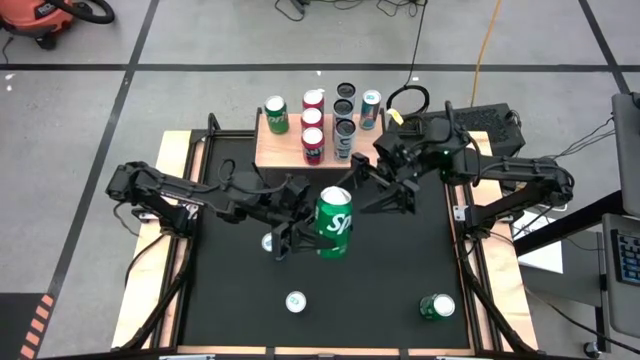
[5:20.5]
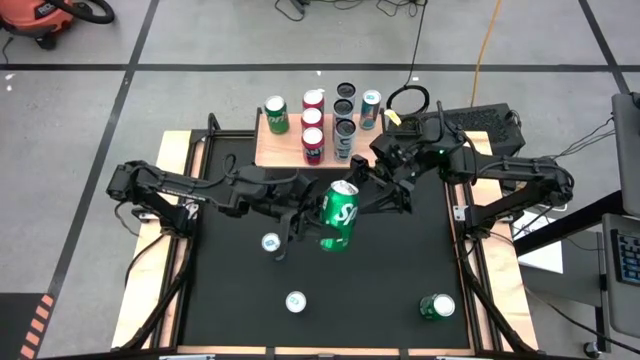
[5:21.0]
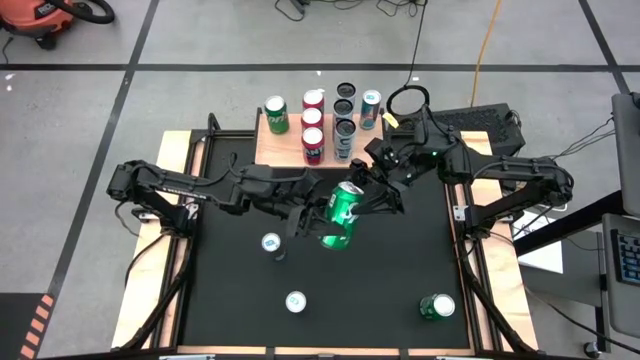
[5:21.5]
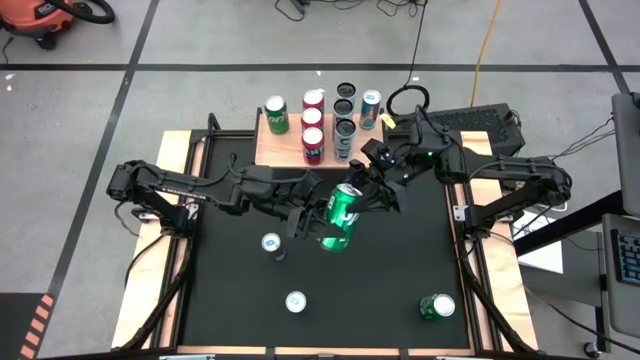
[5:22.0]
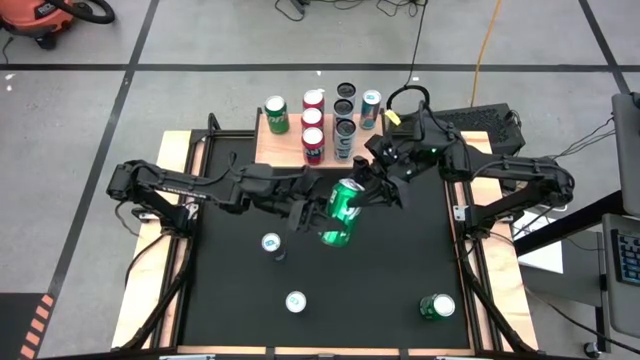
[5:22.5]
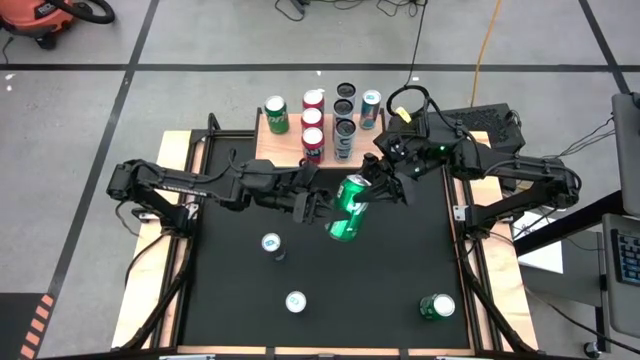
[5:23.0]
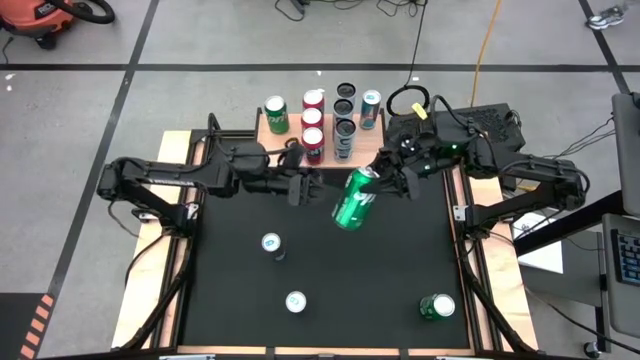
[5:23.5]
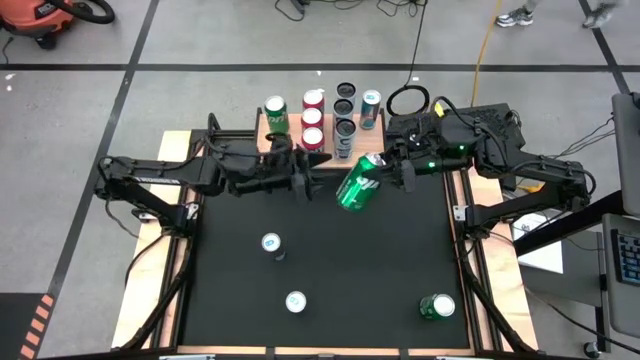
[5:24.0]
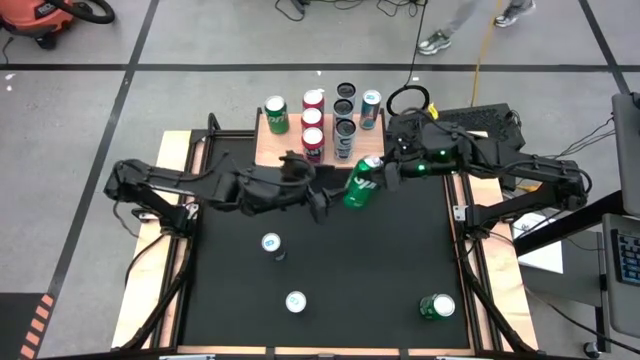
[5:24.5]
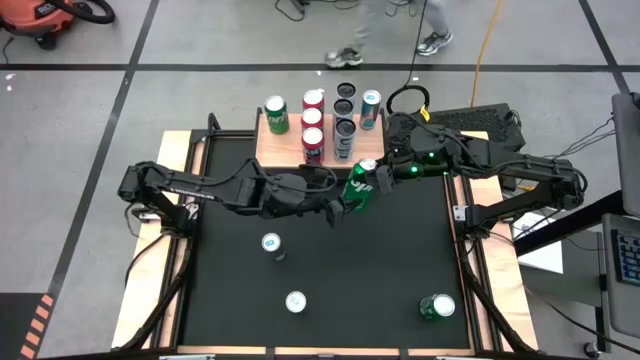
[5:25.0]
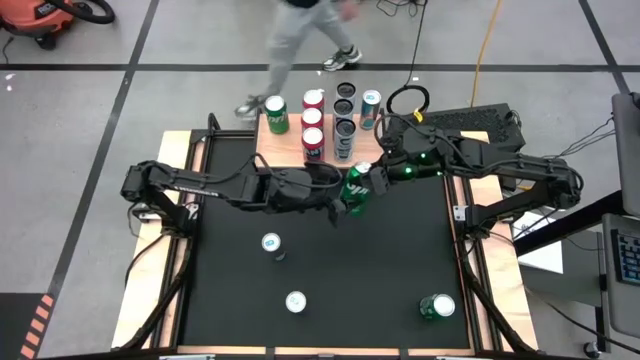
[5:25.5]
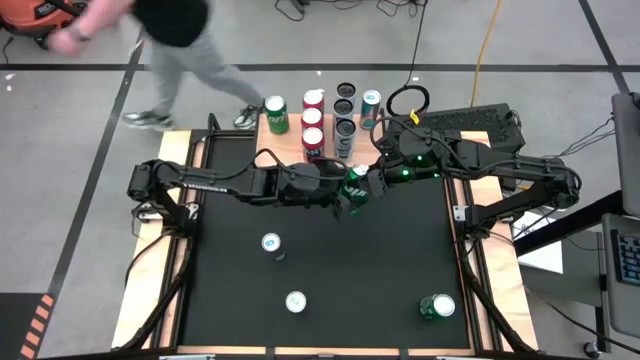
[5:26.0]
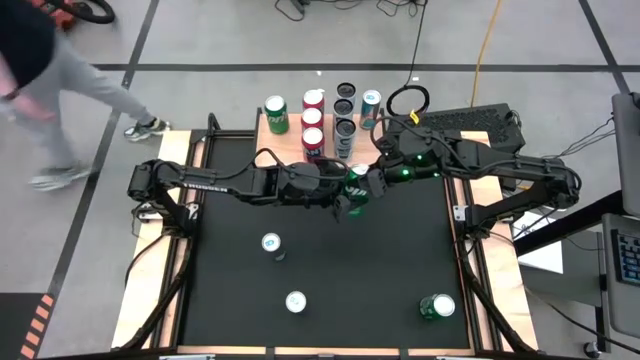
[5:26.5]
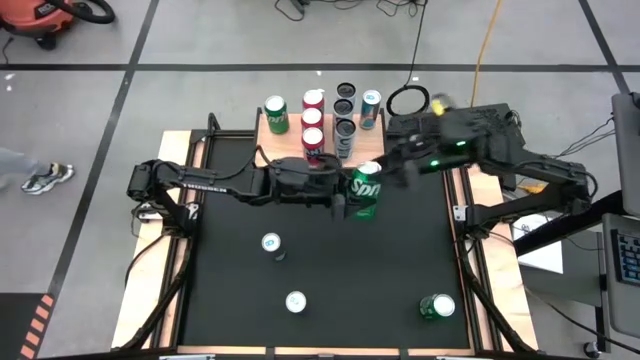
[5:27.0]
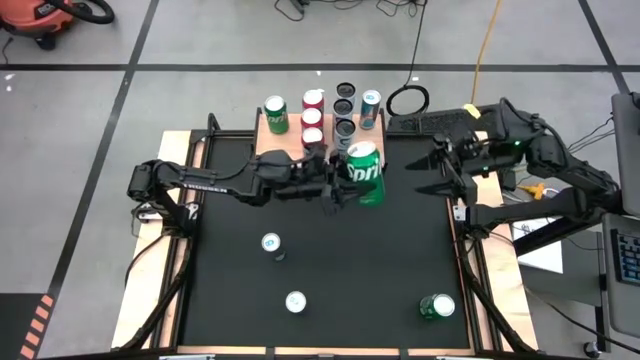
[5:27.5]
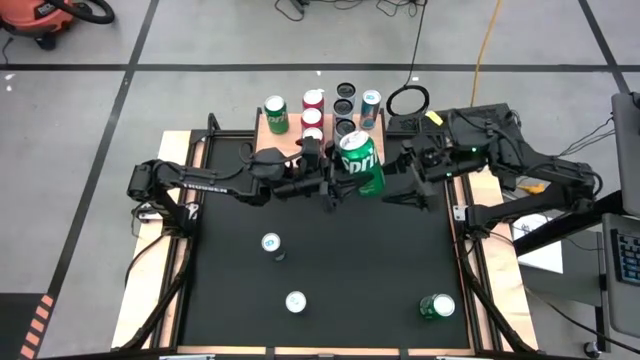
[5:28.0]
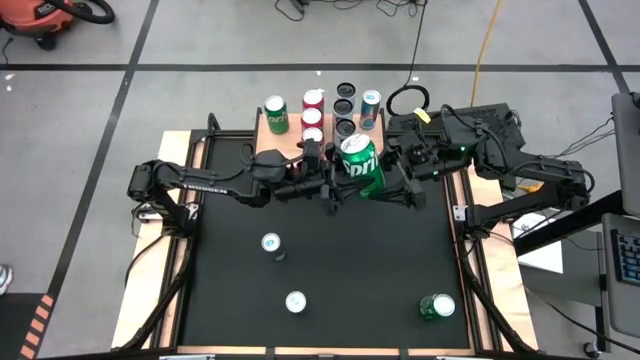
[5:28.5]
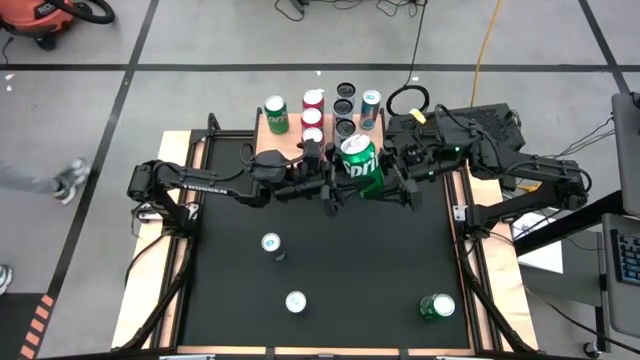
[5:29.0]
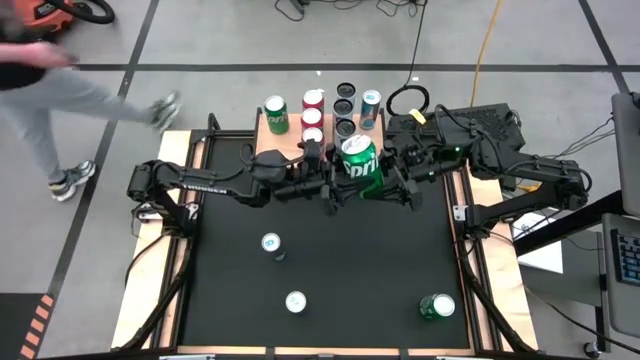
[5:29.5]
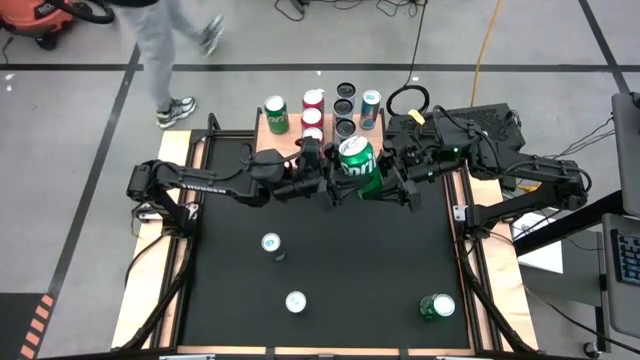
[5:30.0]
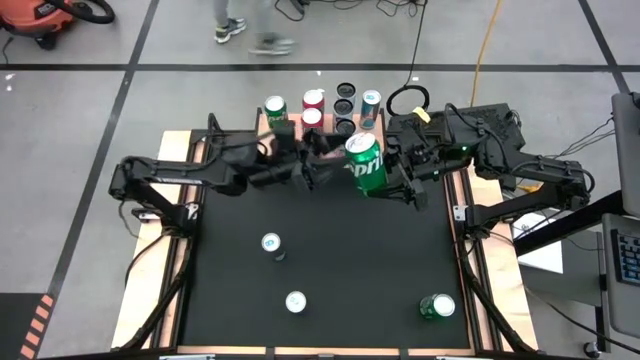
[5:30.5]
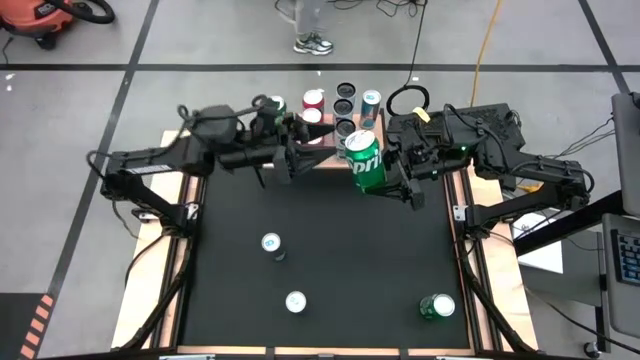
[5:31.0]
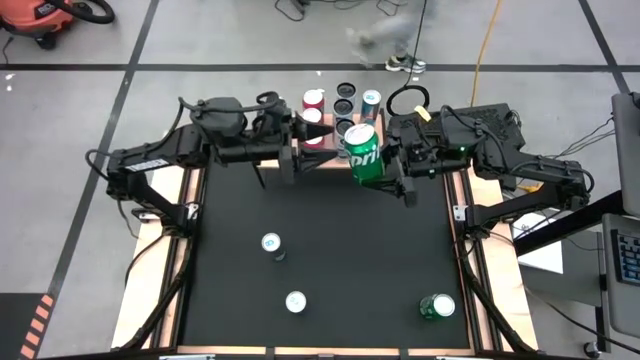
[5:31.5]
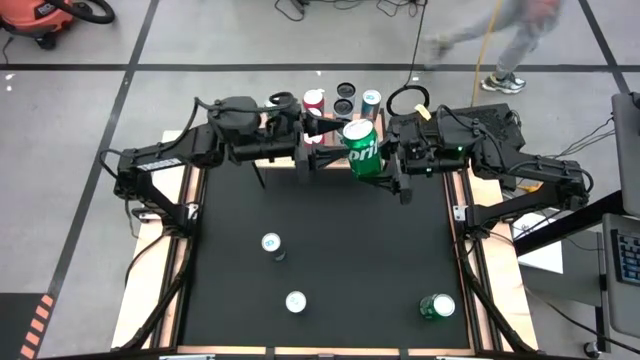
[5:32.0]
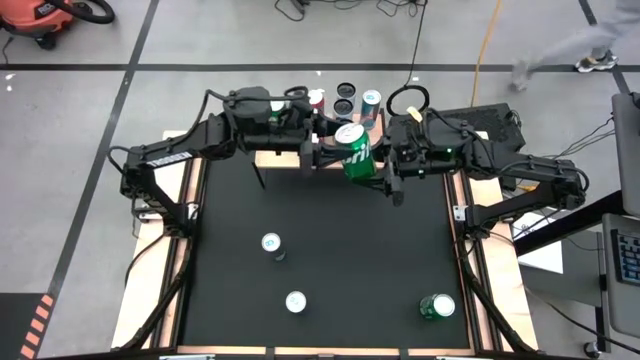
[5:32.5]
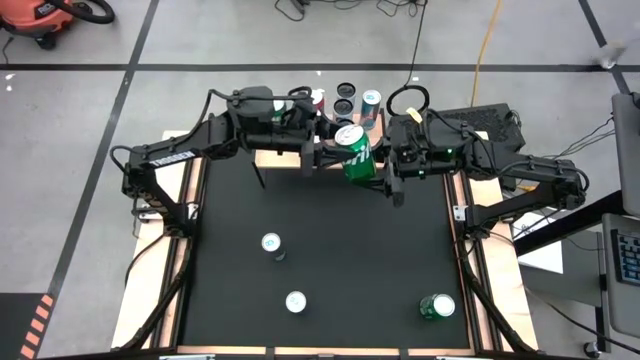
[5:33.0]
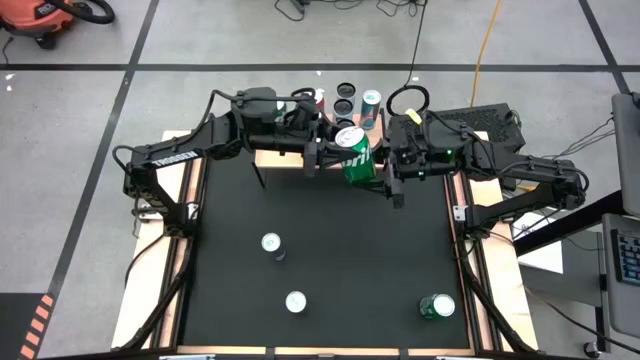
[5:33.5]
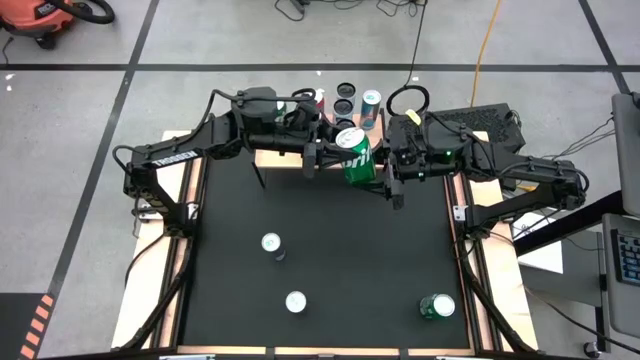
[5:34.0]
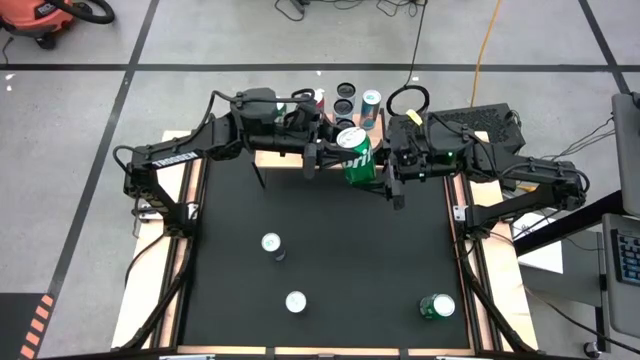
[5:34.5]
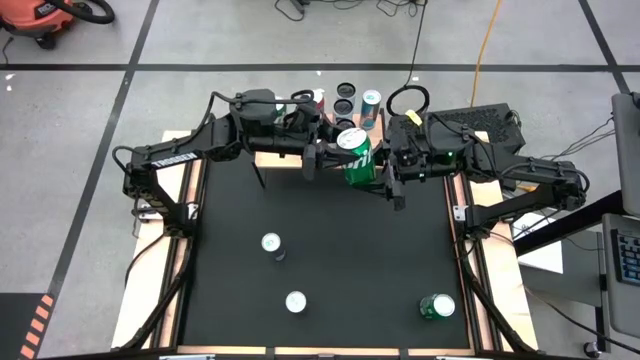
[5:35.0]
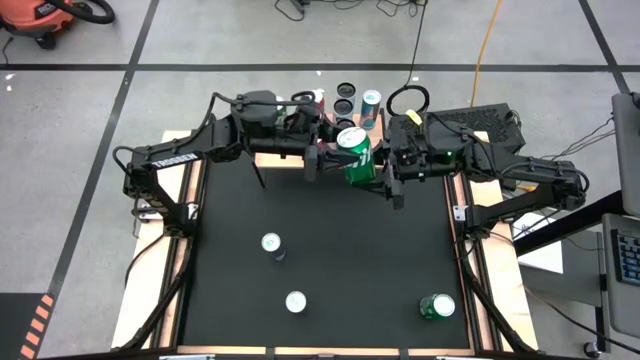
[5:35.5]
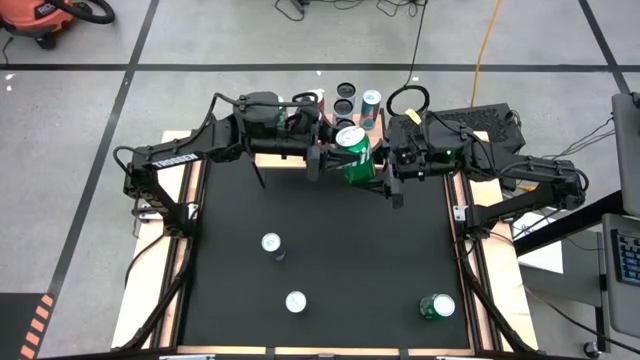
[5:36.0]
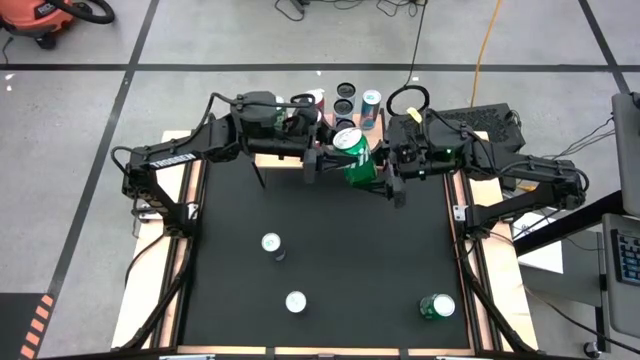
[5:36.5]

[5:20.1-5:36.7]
Task: Place canned beverage on shelf
Put the left green soda can on the shelf aligned with the other green soda can

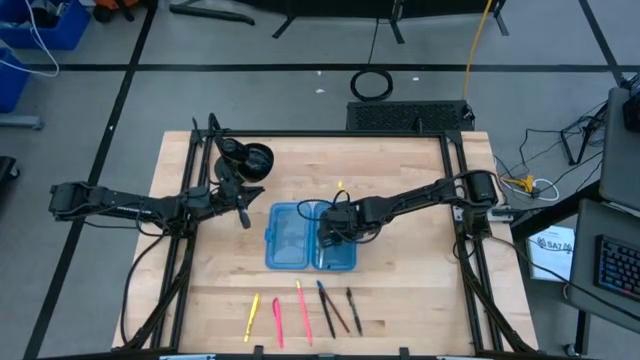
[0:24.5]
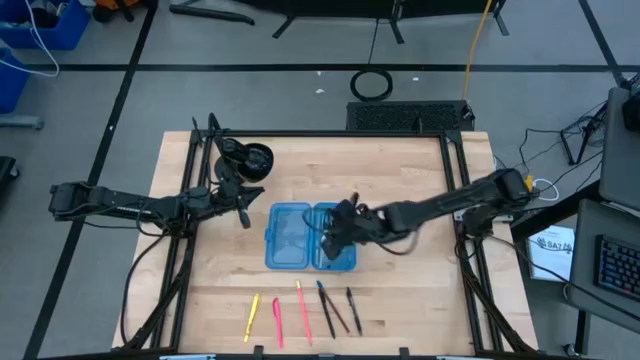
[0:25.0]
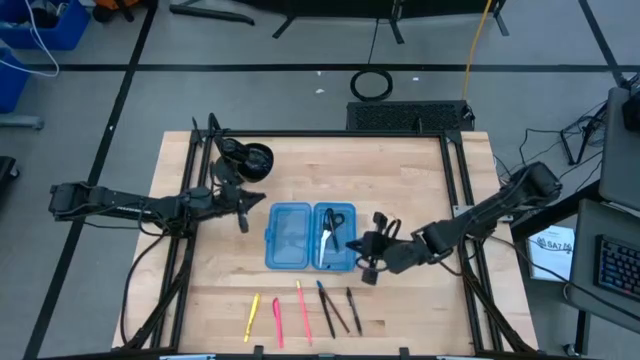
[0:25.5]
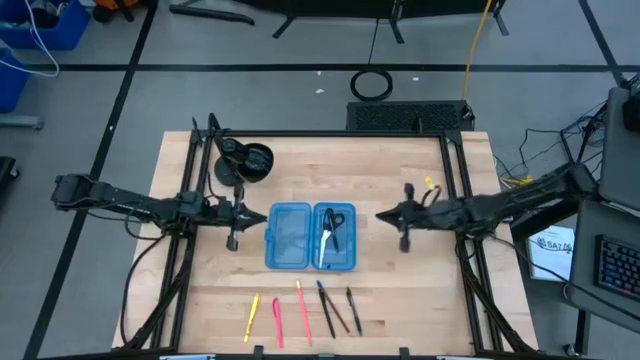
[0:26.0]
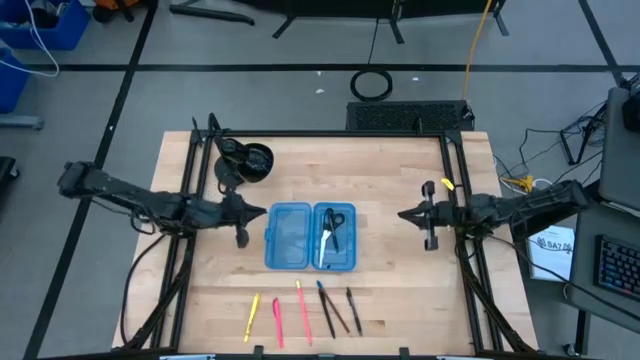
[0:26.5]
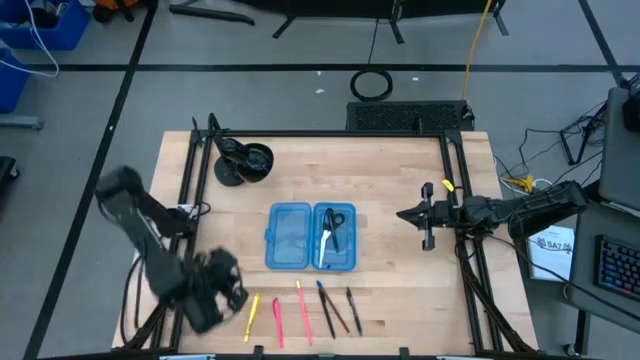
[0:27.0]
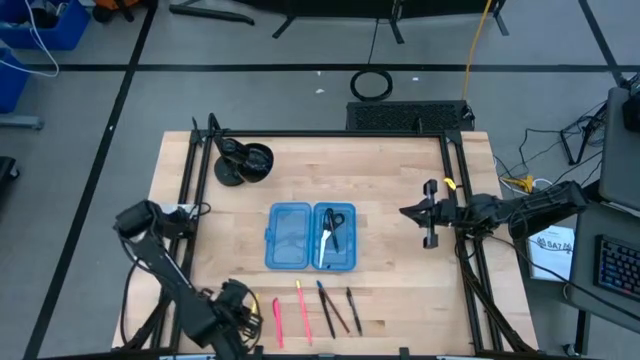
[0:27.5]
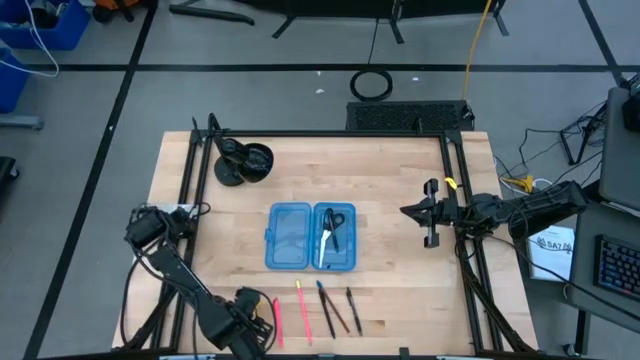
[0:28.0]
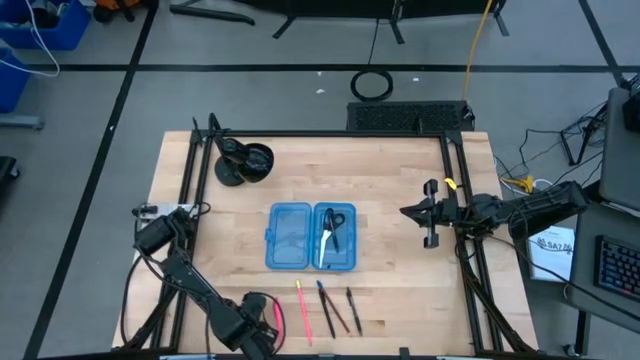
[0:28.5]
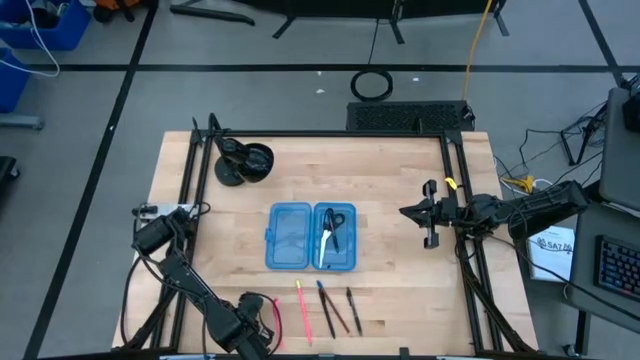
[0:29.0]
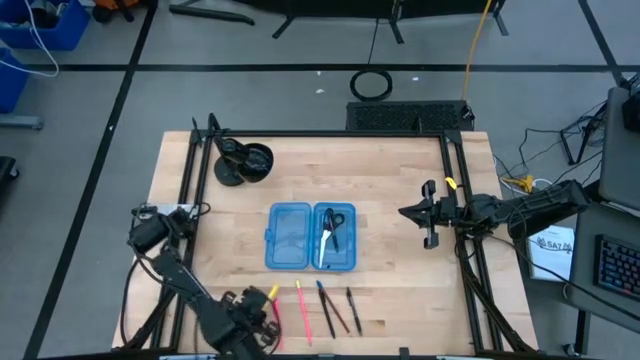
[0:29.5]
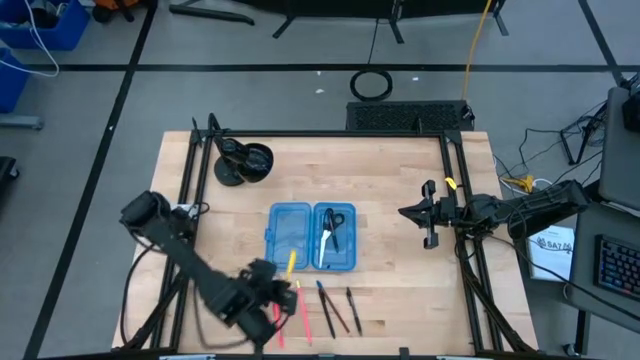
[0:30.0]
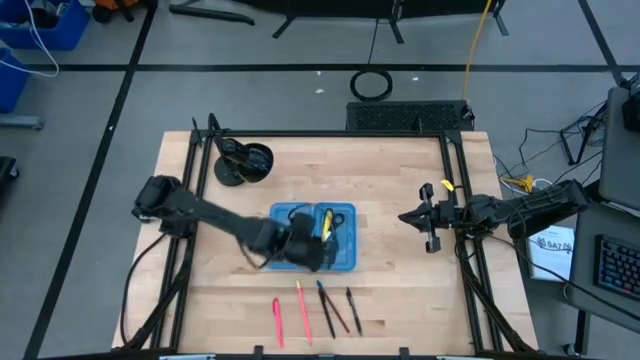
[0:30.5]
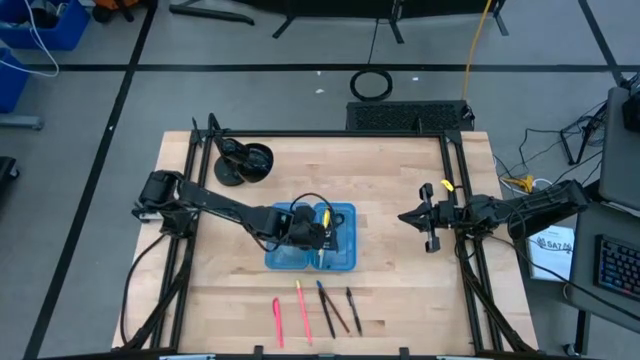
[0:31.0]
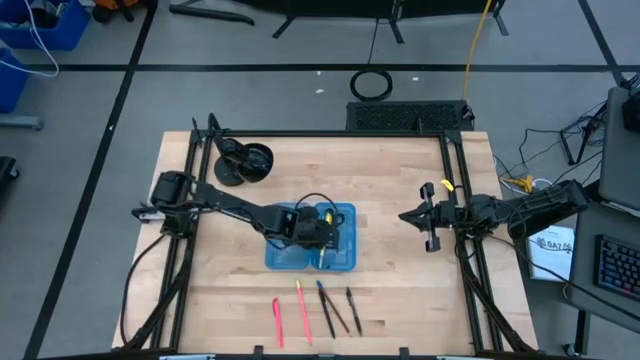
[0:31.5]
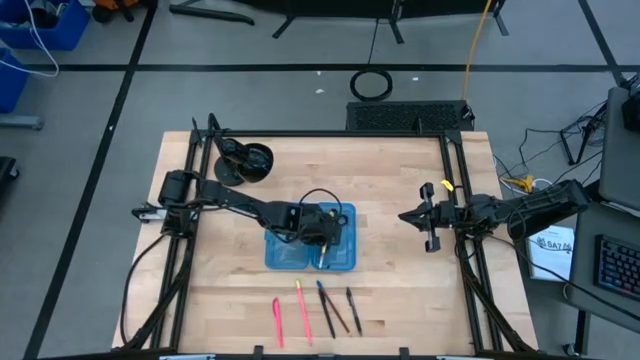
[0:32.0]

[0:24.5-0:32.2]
Task: Pick & place school supplies into a supply box
Put the yellow pen into the blue supply box
